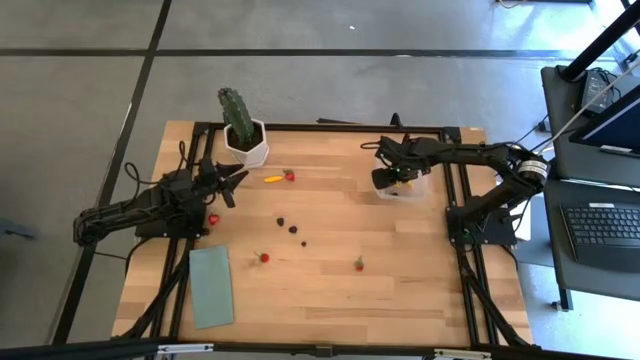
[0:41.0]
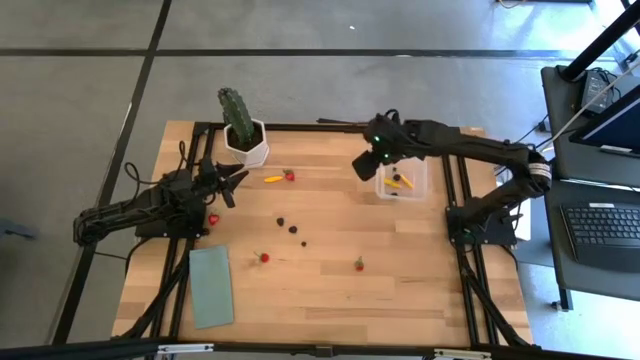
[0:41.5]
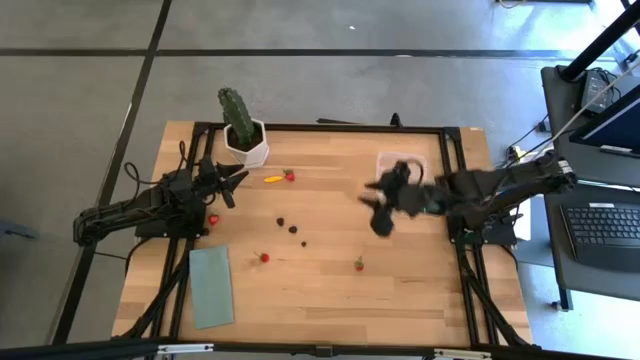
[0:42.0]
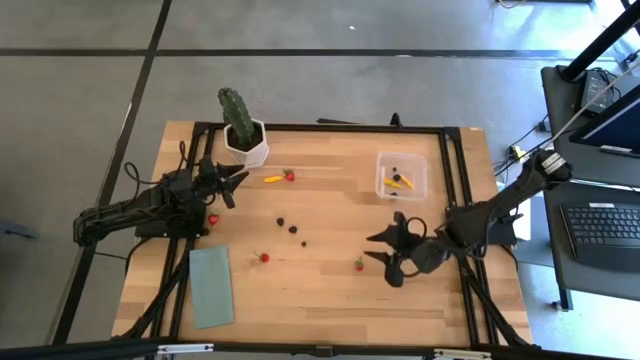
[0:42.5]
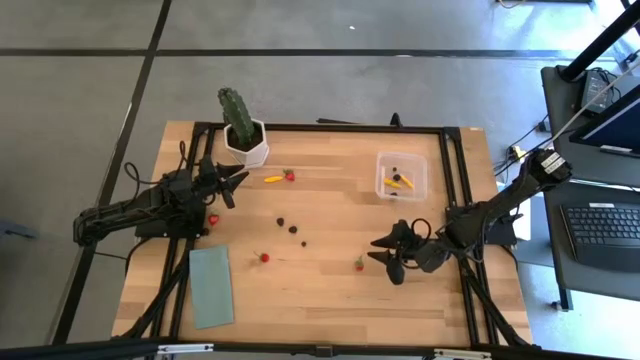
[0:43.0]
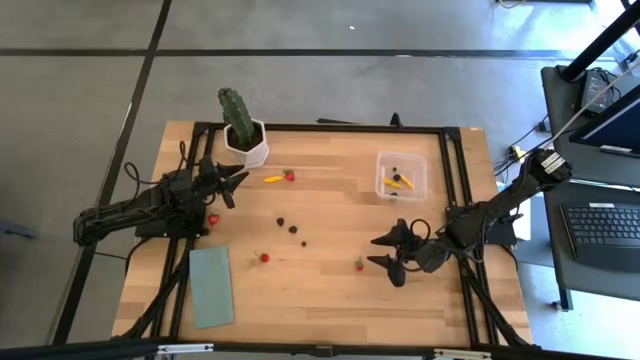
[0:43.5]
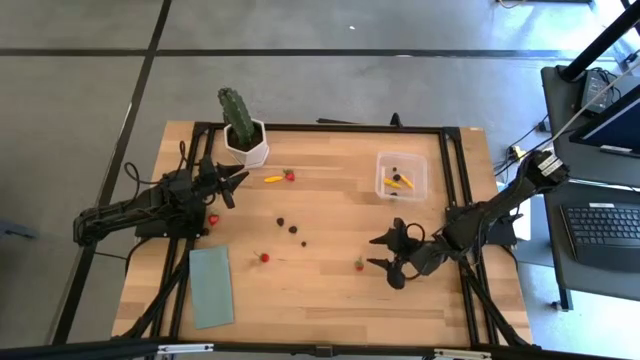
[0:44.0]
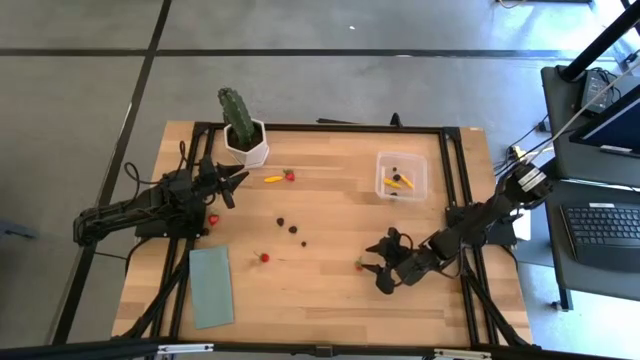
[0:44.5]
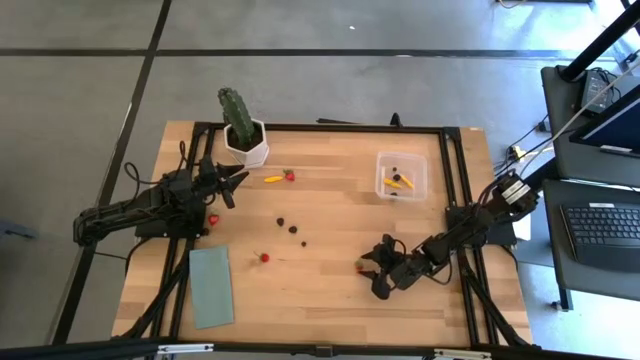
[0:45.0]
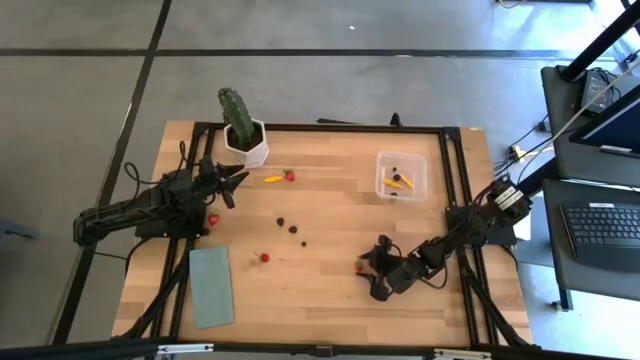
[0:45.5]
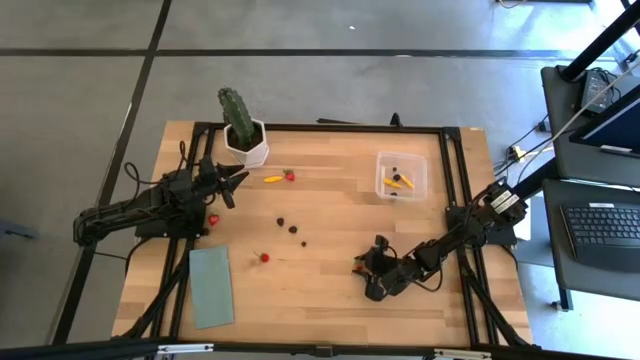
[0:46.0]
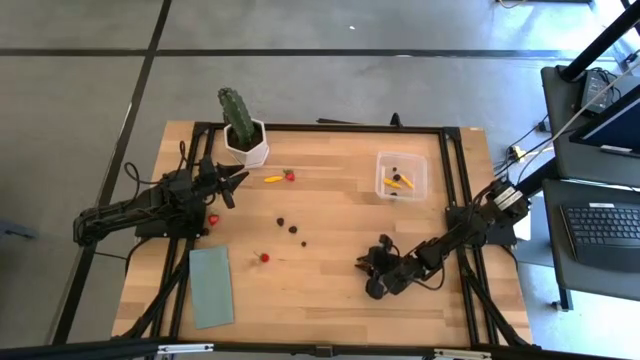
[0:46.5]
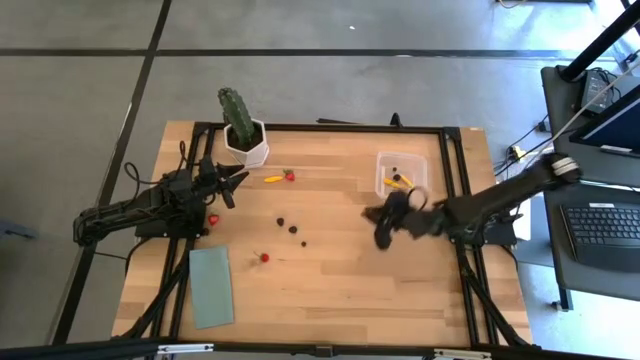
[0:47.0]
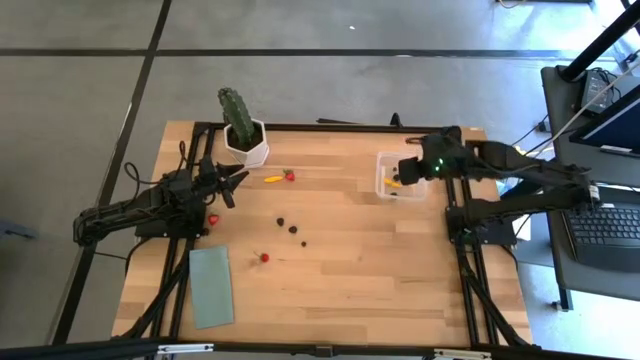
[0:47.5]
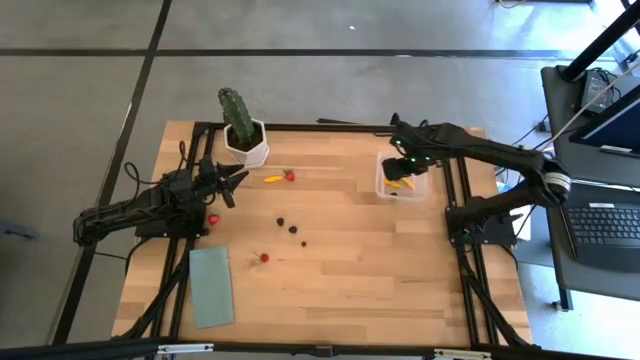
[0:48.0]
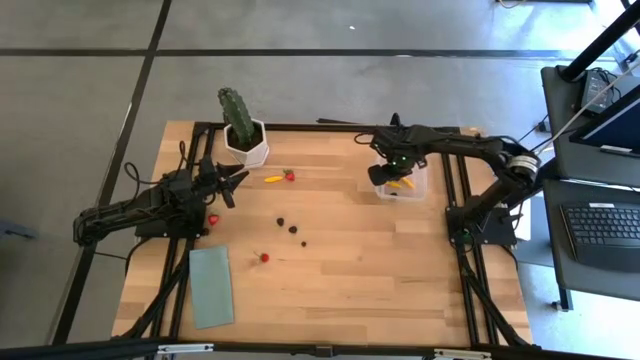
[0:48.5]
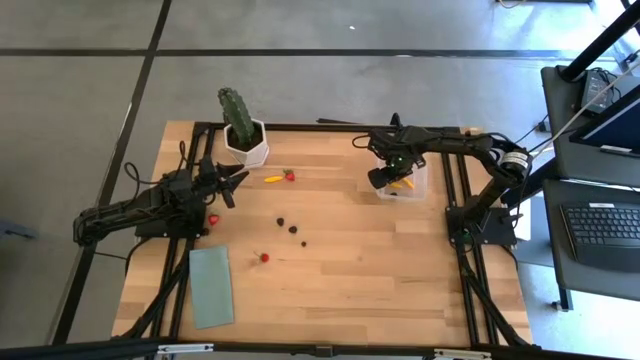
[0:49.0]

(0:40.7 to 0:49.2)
Task: Pick and placing Produce into tupperware
Put the bottom right red strawberry into the transparent bin

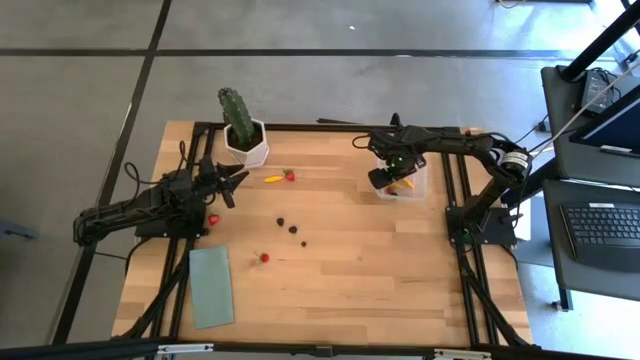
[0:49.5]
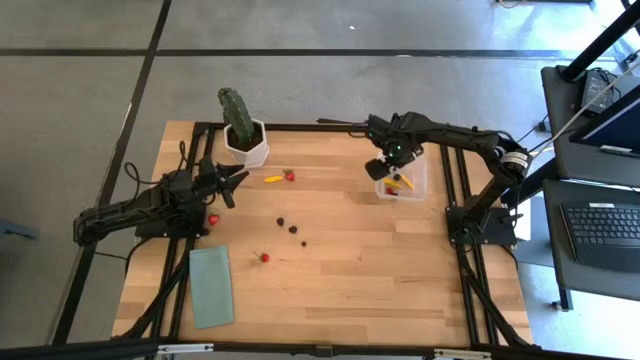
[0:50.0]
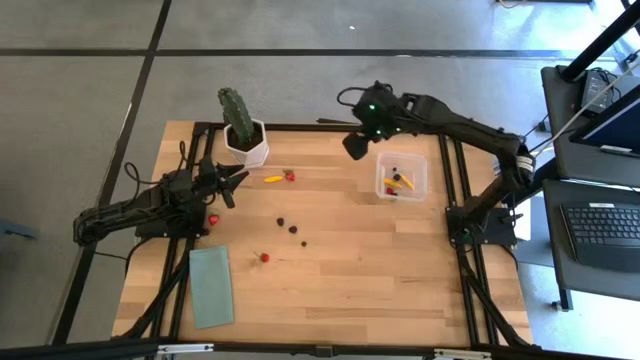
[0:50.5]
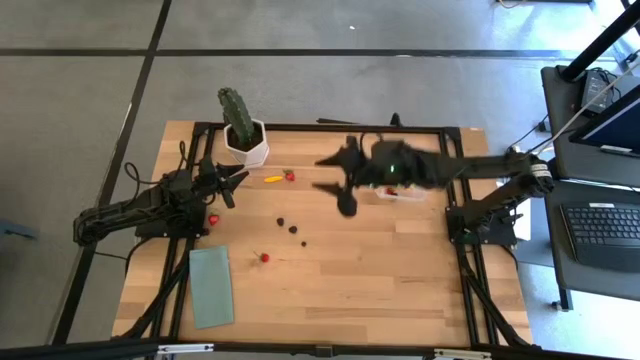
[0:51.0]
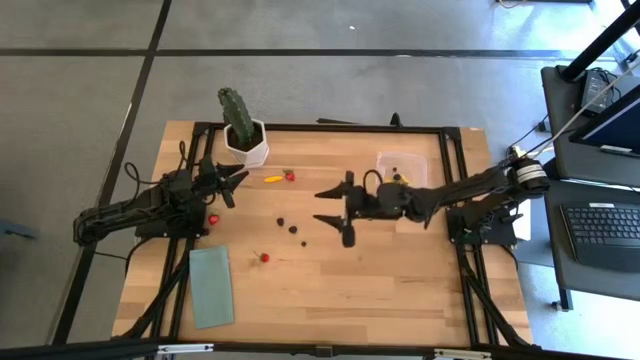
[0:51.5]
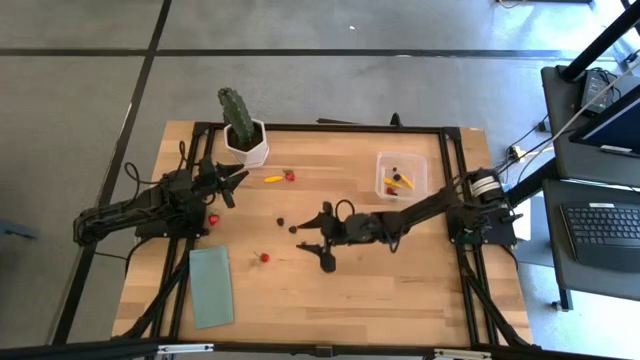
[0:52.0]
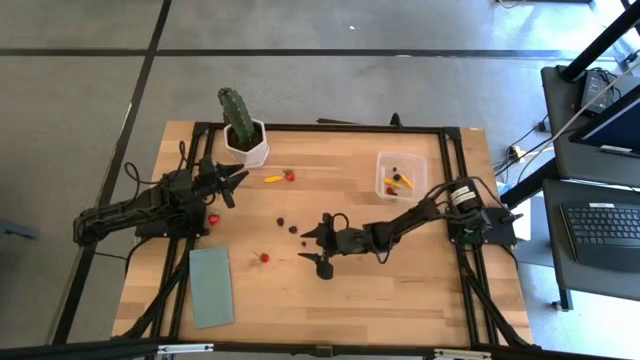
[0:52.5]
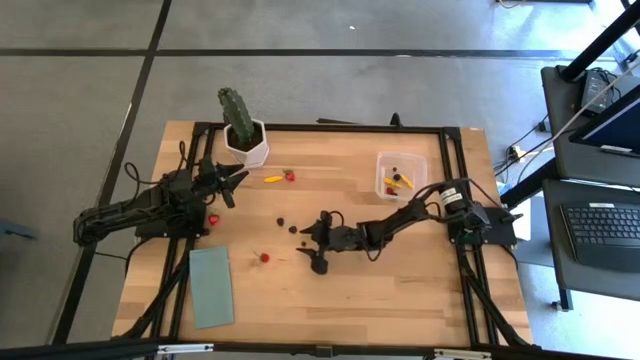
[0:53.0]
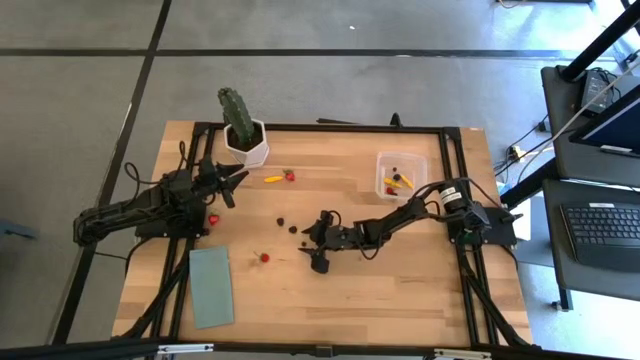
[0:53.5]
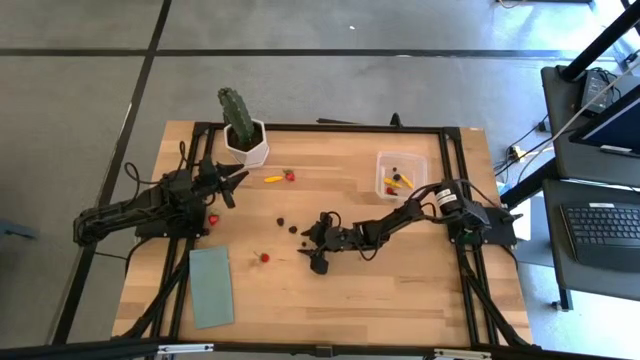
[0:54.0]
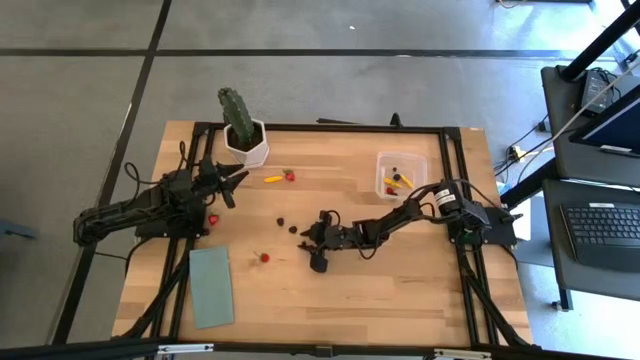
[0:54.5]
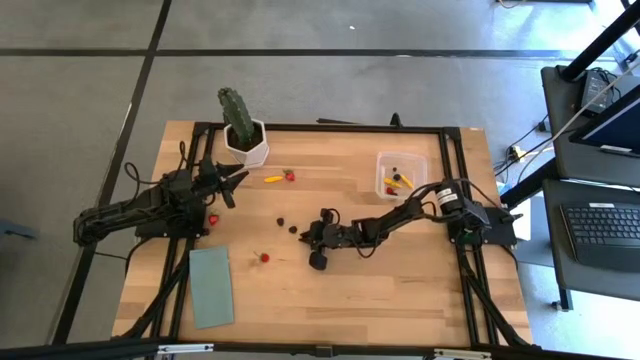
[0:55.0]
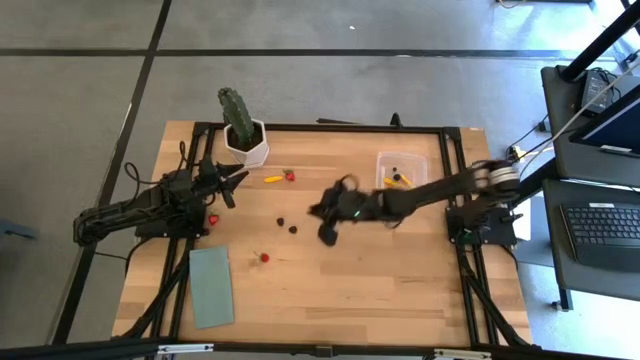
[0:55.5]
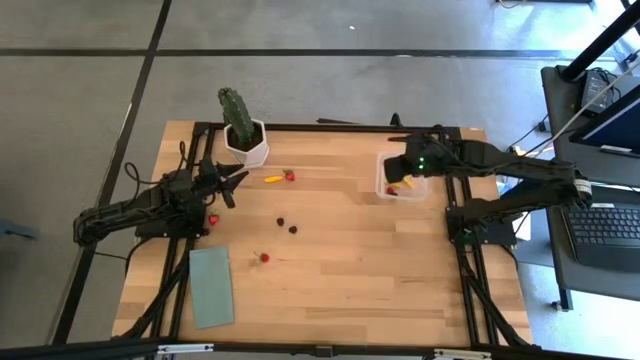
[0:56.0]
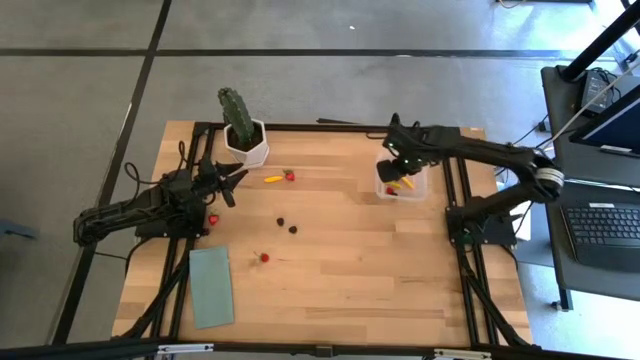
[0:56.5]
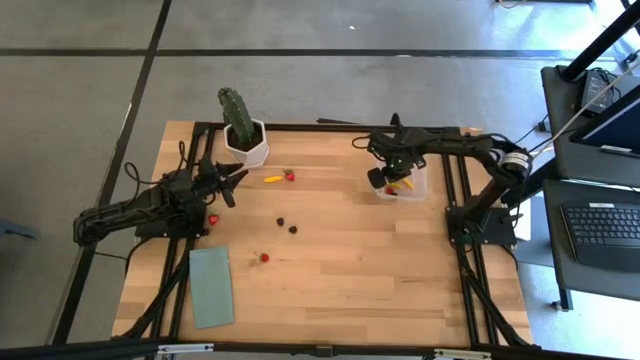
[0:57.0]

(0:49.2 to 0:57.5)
Put the black blueberry into the transparent bin

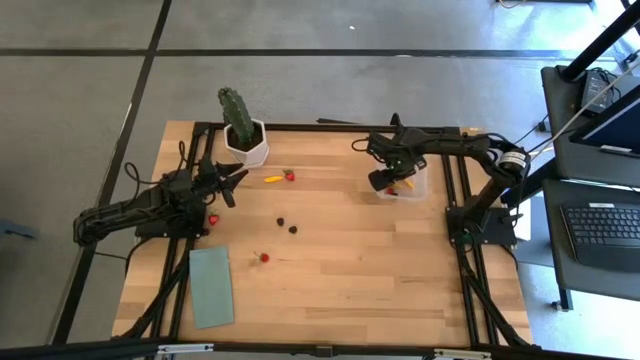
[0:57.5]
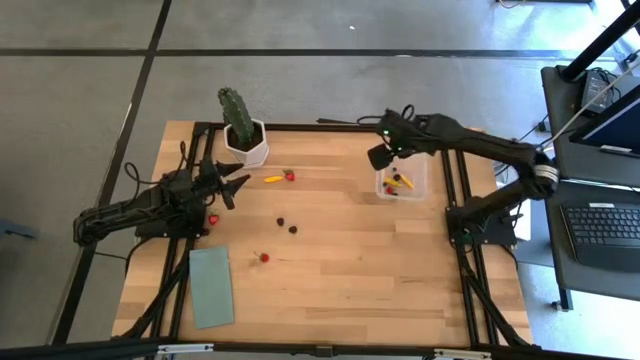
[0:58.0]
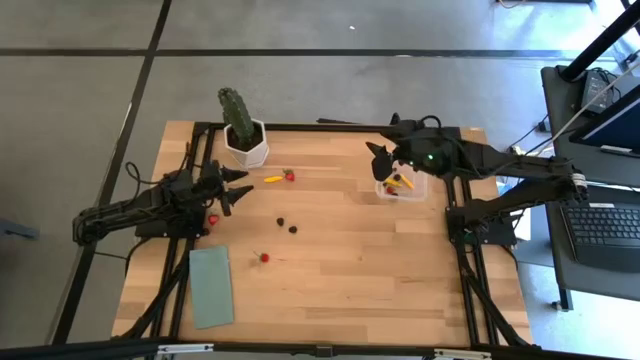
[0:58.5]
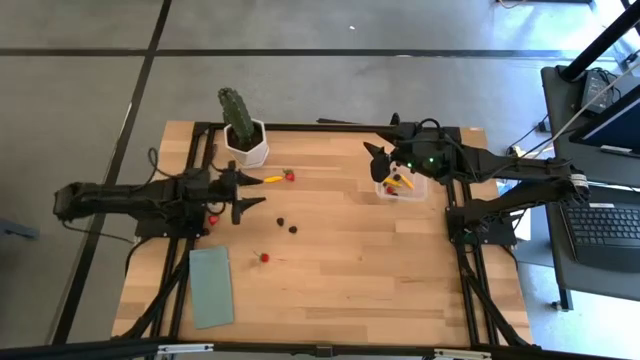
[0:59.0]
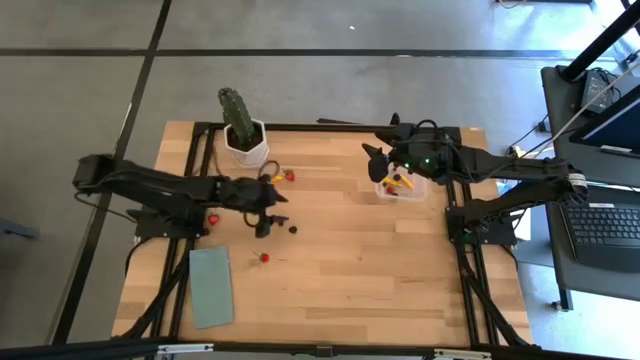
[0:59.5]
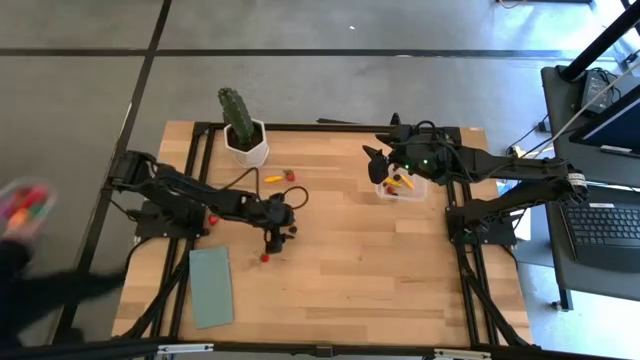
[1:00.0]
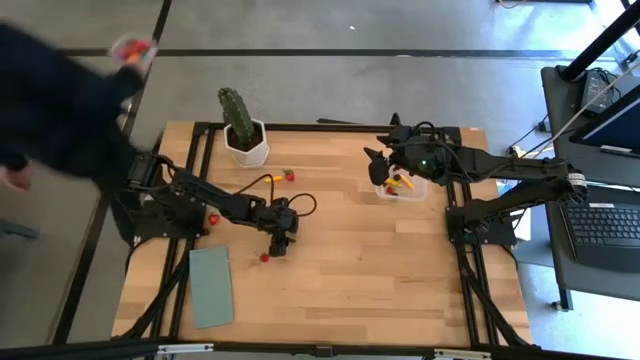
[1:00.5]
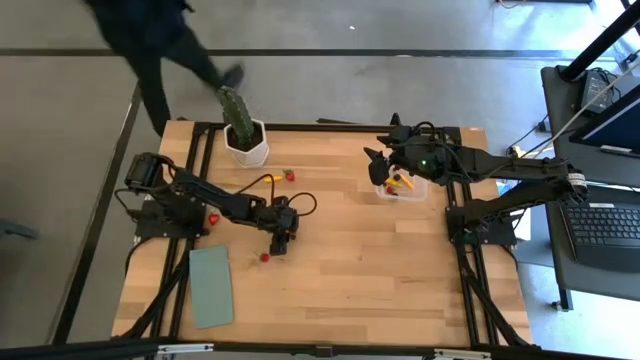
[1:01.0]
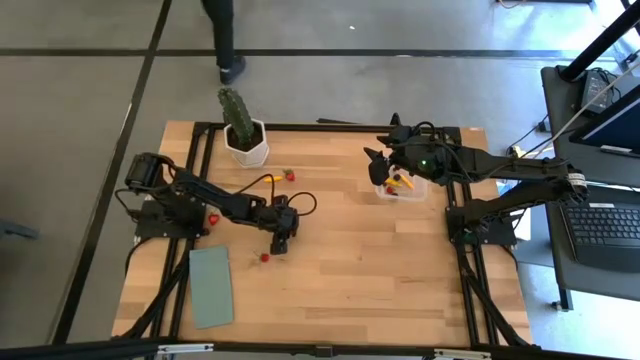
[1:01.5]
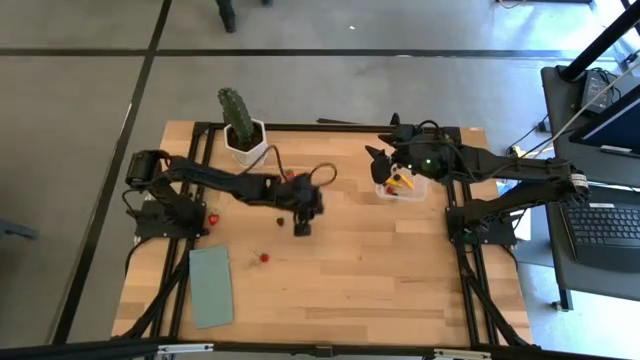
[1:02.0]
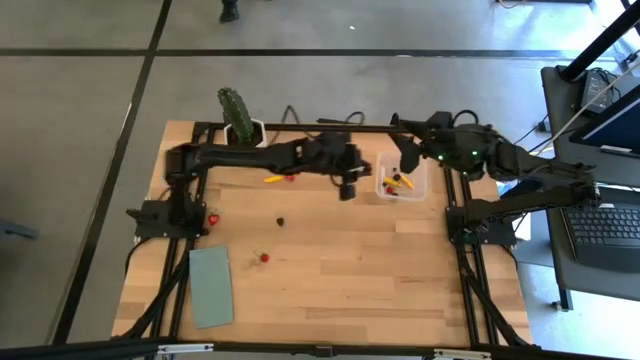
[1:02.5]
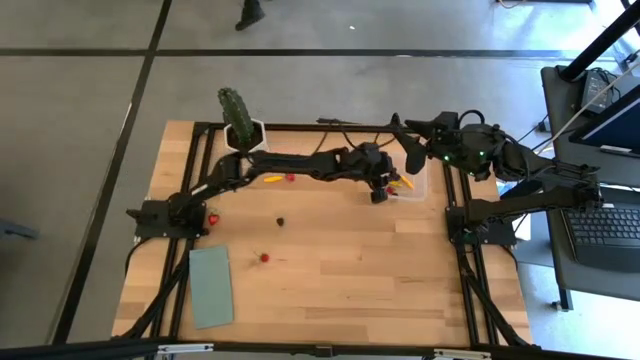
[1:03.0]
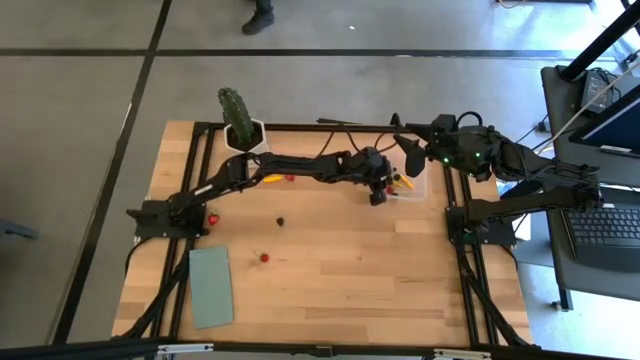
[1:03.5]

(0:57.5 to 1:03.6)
Put the bottom black berry into the transparent bin
